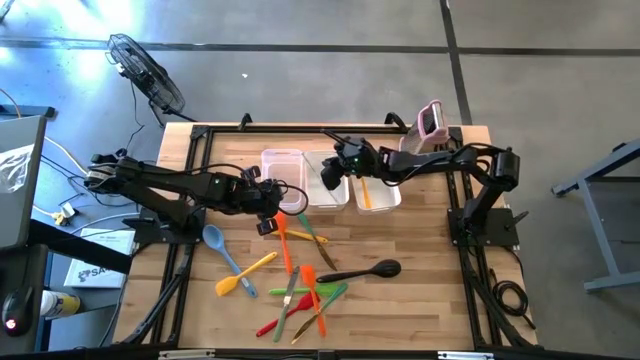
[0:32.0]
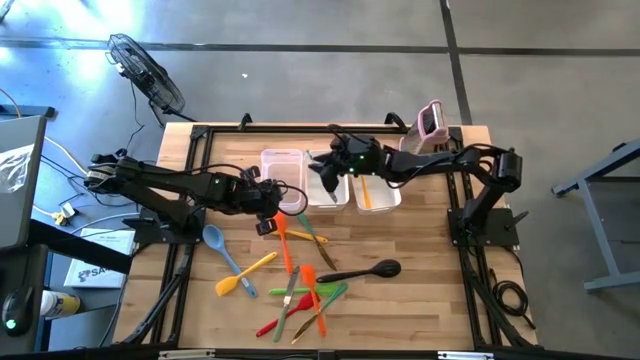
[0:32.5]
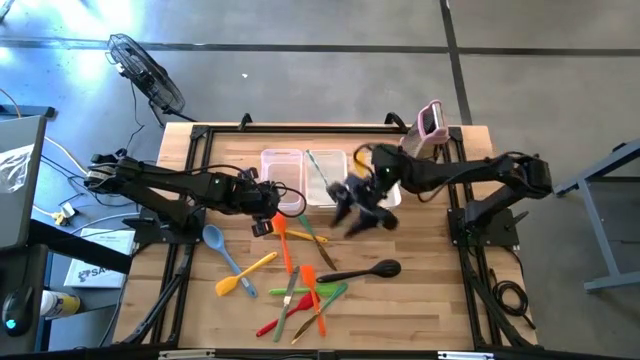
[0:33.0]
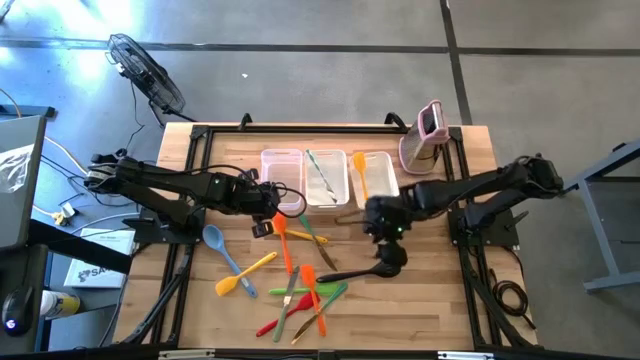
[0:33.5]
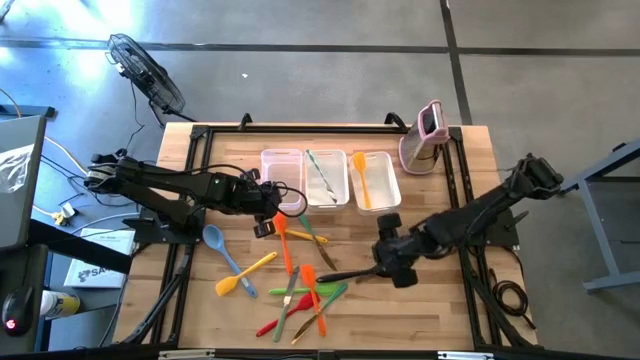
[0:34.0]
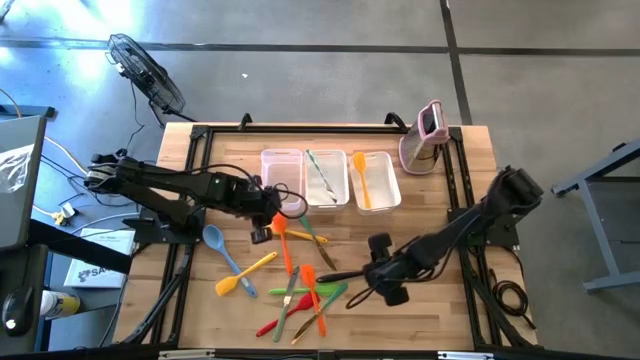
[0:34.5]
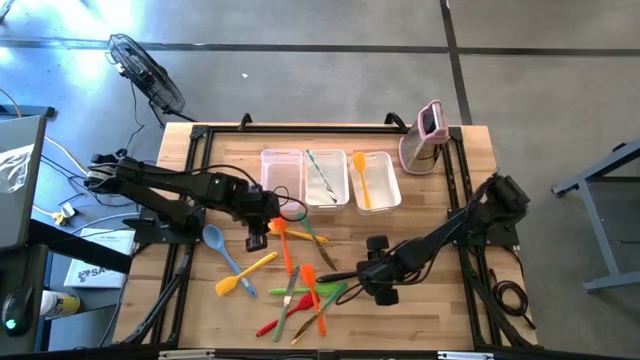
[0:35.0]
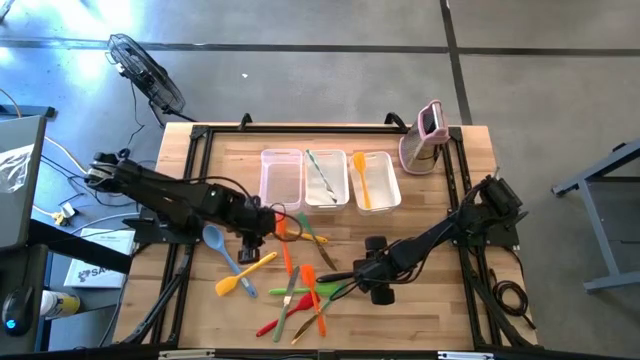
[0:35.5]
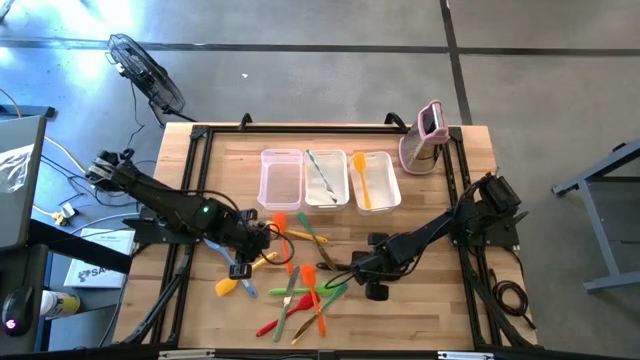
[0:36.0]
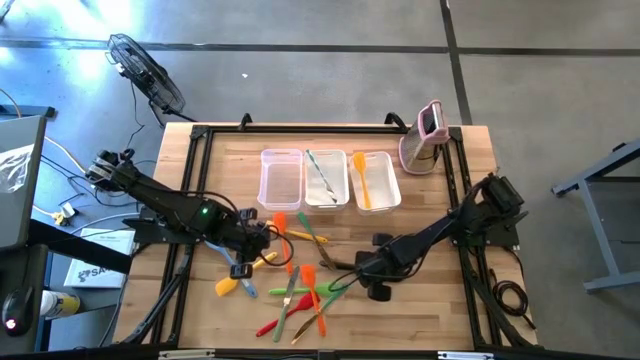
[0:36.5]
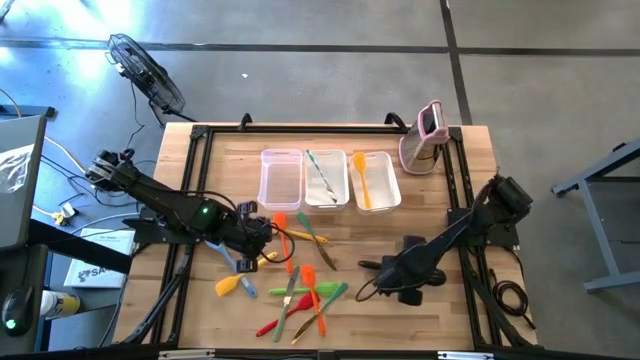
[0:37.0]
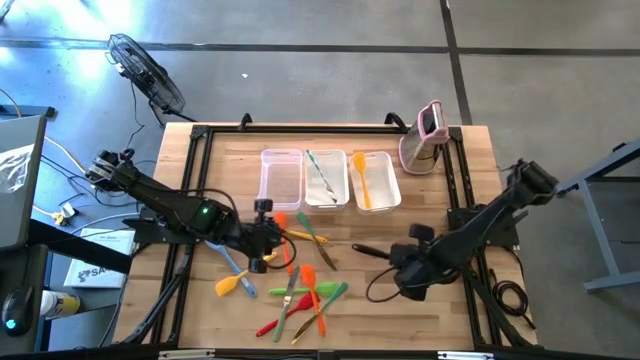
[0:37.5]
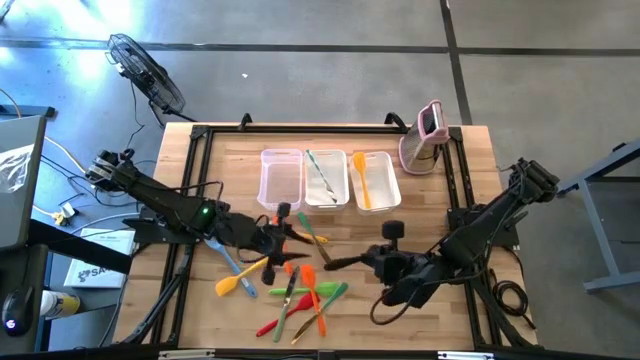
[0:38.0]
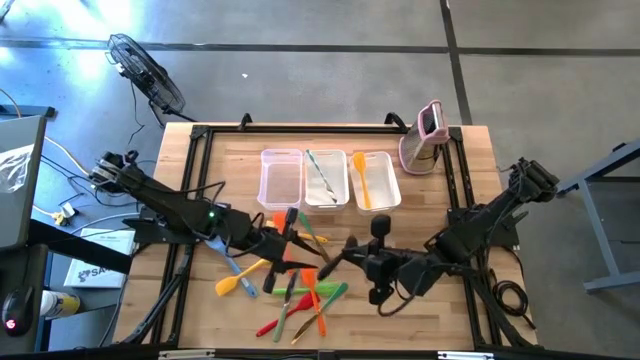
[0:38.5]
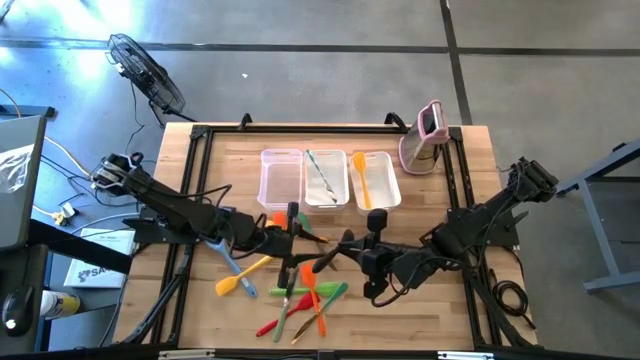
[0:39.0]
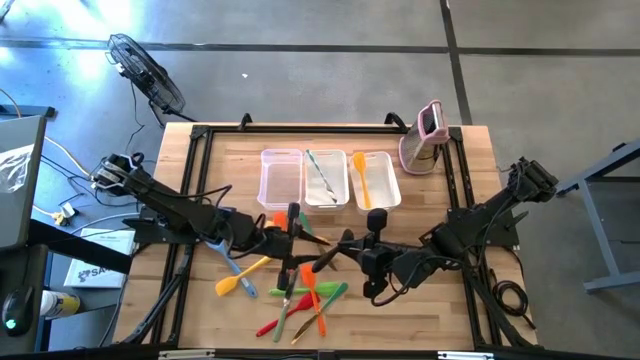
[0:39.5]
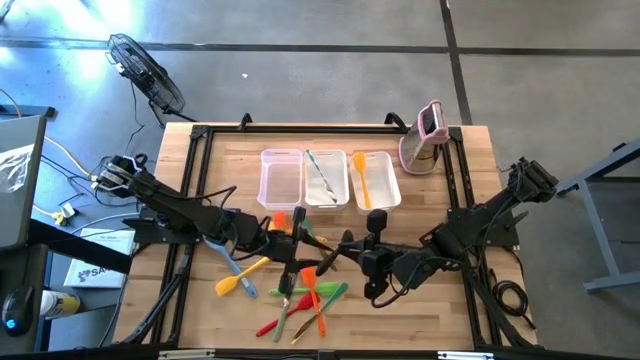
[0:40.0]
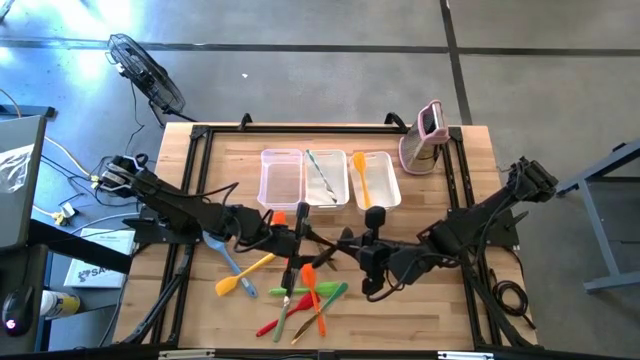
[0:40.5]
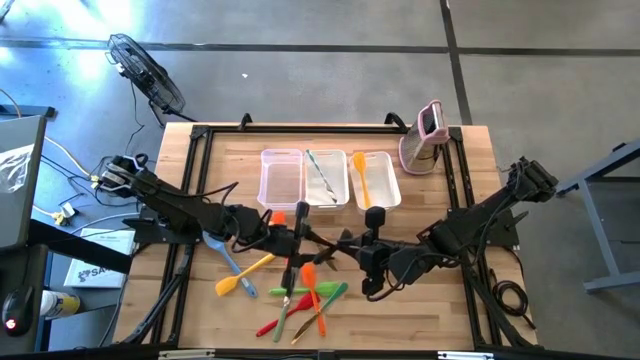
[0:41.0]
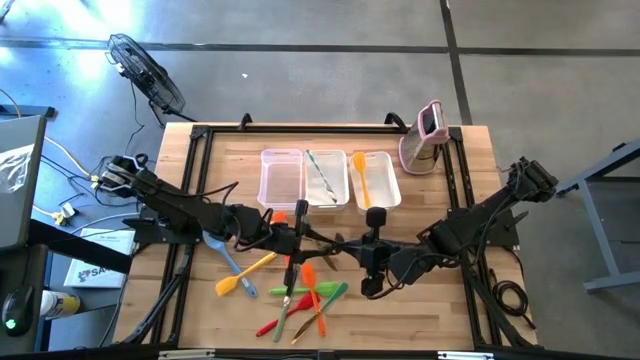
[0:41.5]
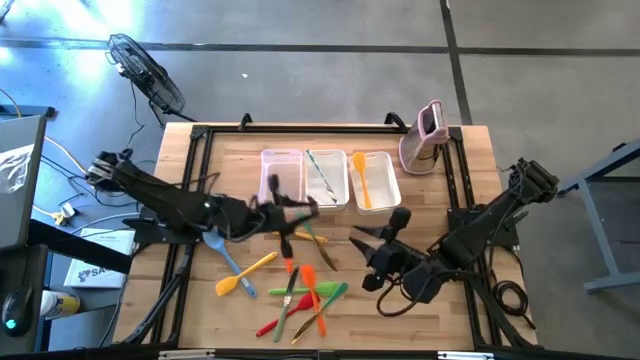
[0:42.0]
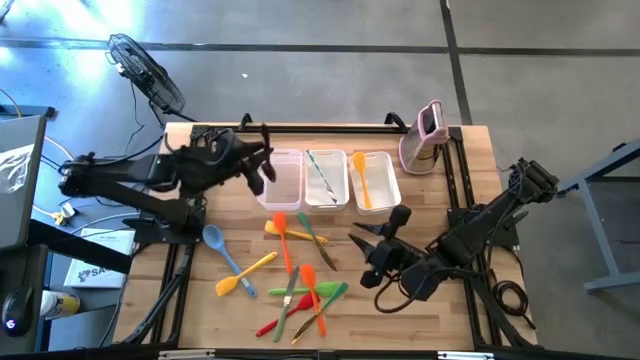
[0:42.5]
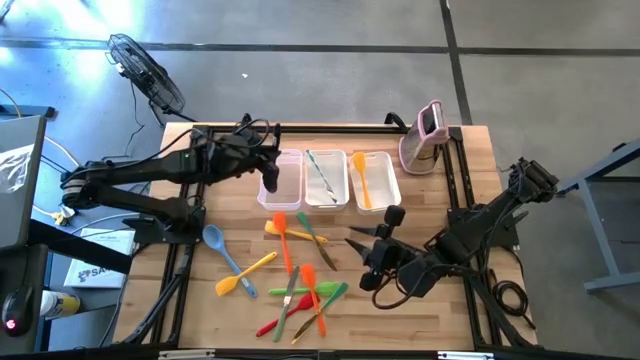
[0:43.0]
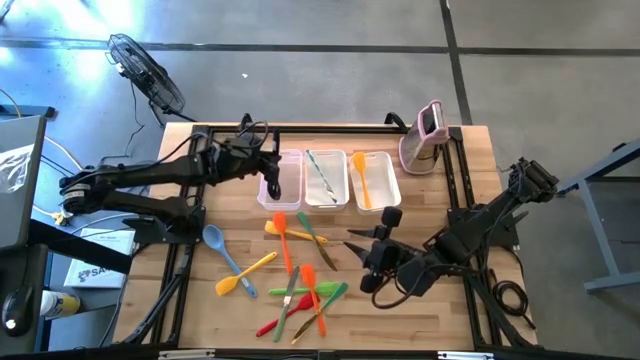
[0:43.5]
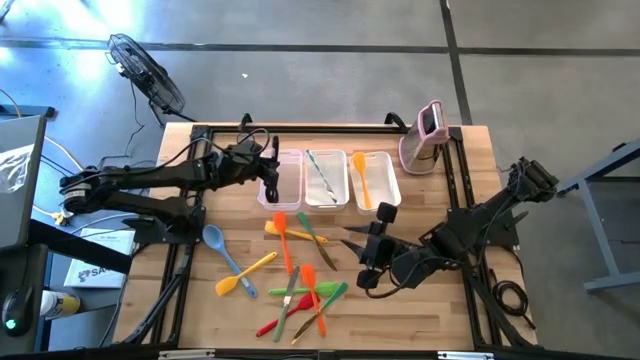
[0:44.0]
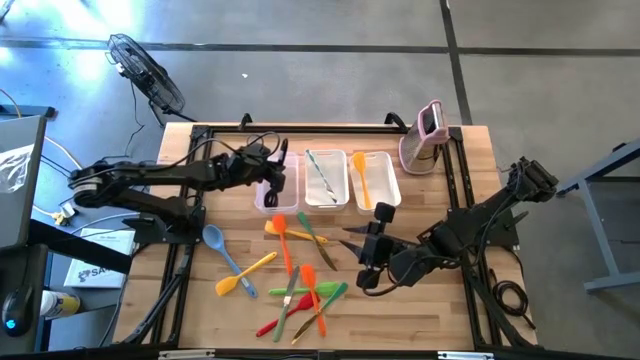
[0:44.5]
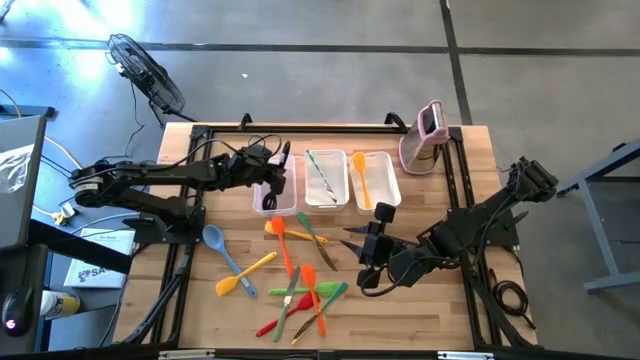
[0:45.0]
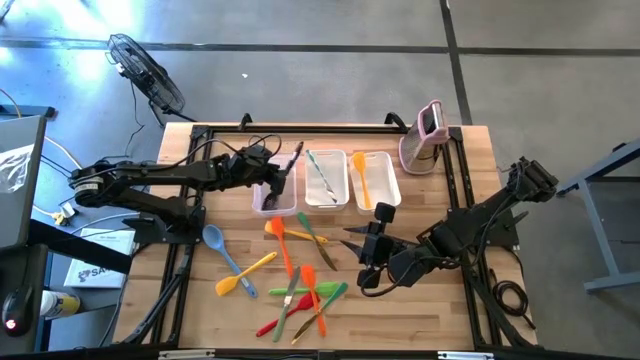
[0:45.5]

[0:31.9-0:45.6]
Task: Pick & Place Kitchen Items
Put the black serving spoon into the transparent bin

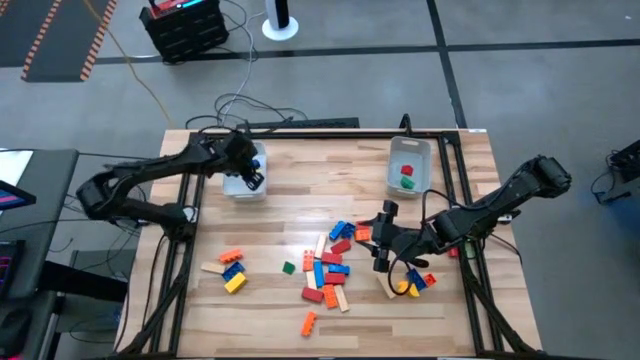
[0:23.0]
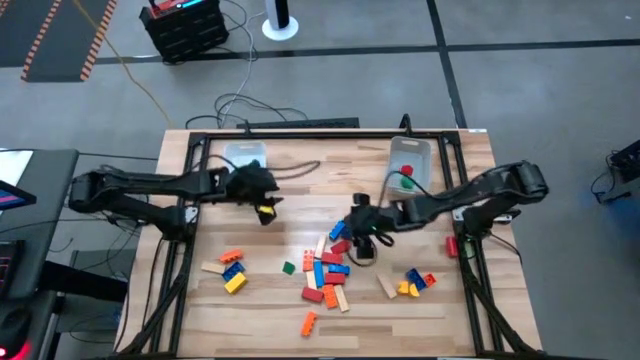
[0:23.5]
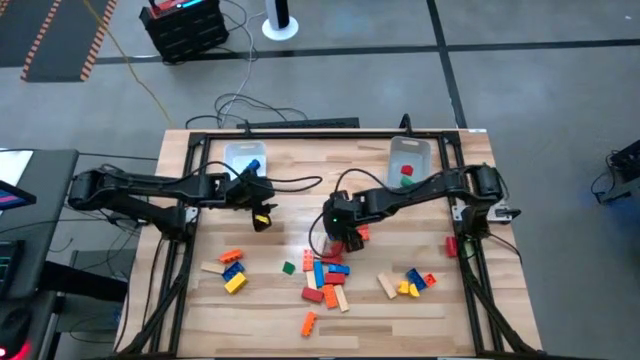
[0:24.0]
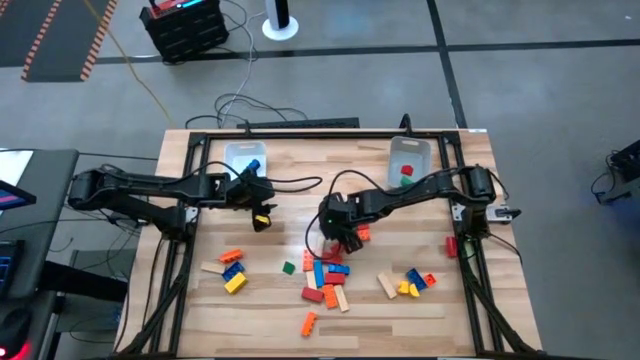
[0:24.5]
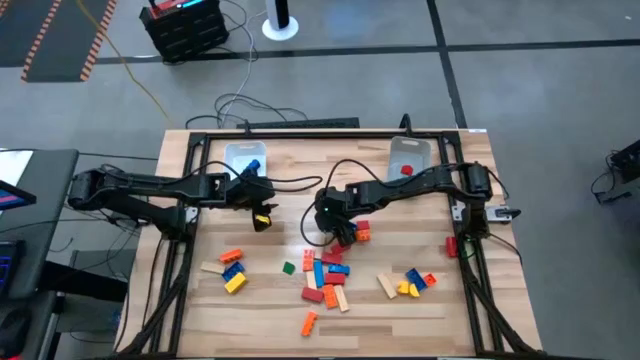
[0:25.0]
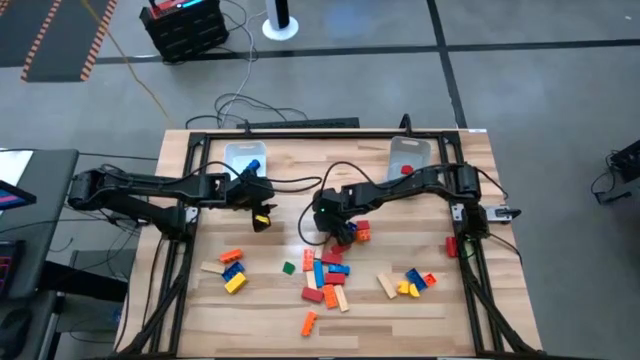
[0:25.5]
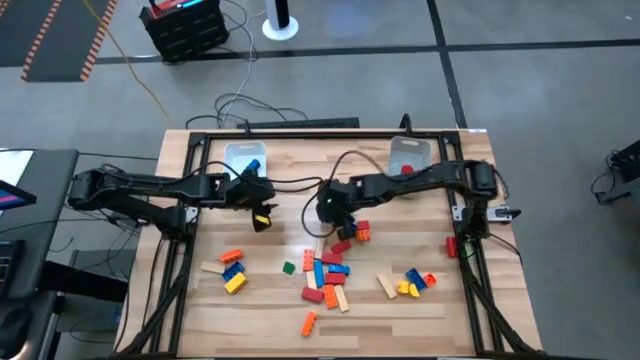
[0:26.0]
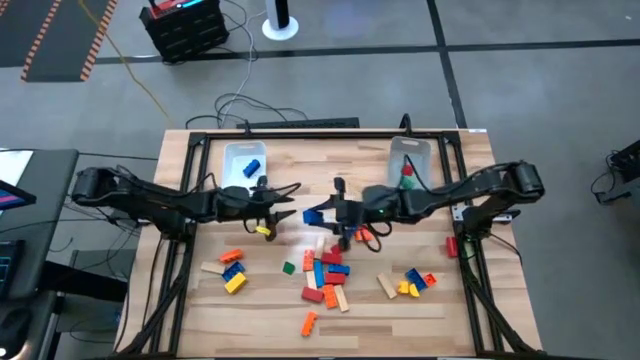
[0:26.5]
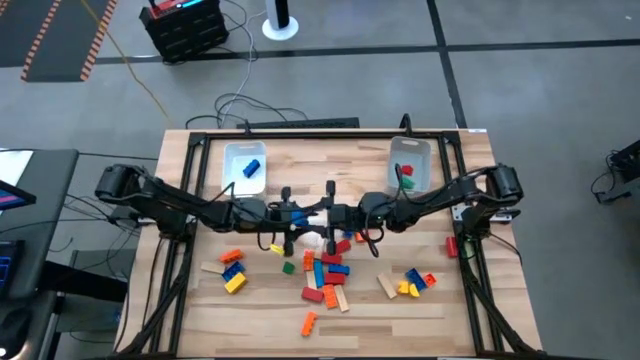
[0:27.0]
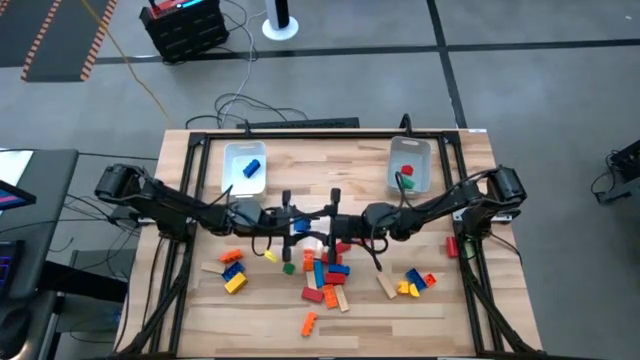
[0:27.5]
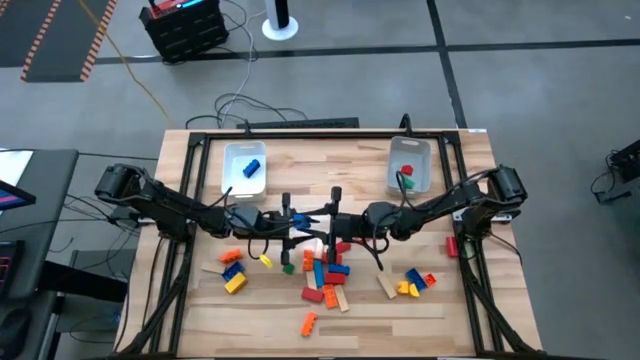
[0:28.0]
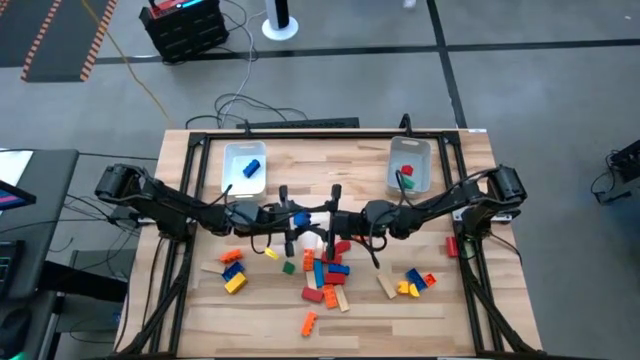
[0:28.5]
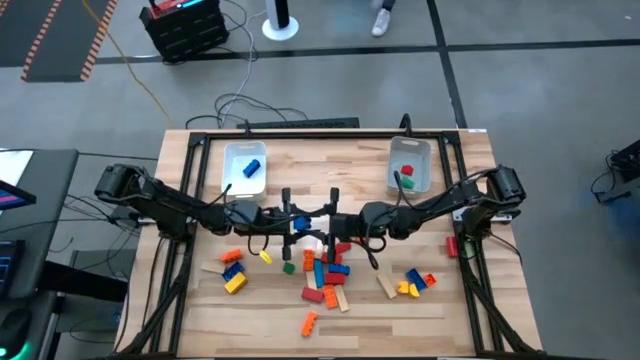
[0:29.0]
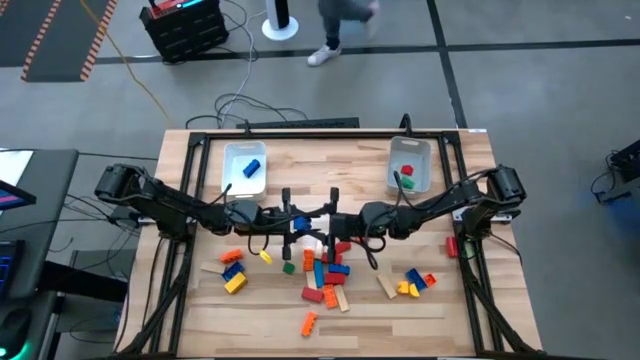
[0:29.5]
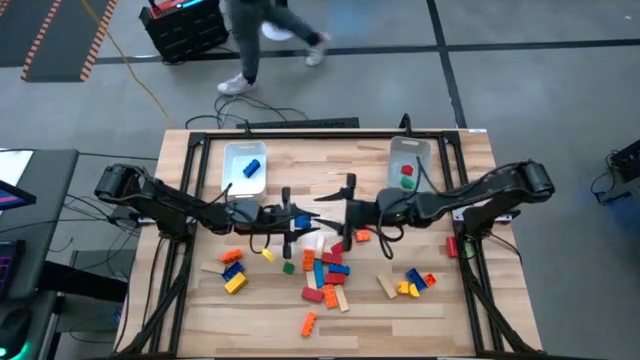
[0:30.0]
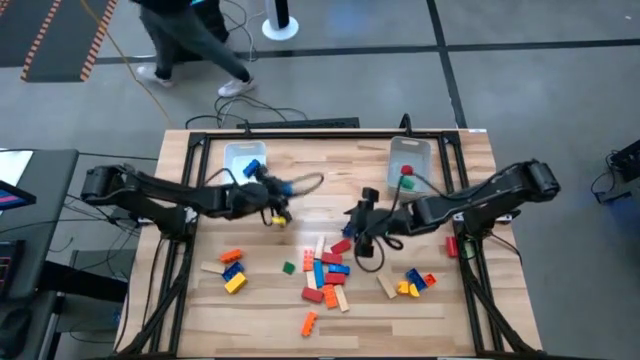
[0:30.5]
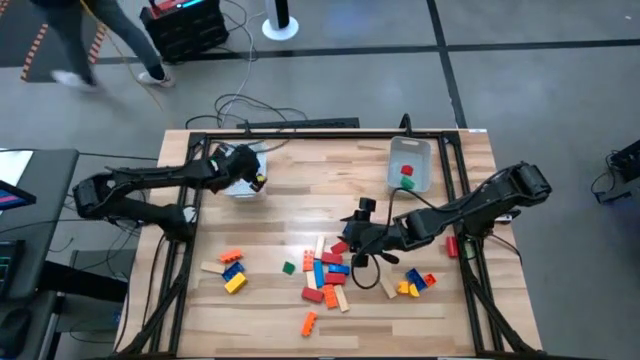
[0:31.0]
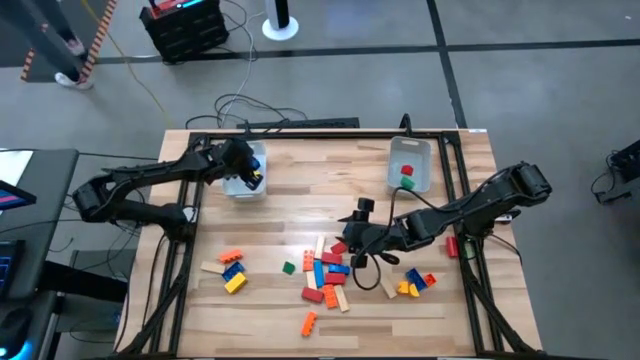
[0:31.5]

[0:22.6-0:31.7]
Task: Sort blocks by size
Put the large blue game piece into the white bin
